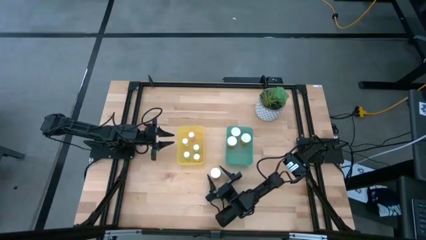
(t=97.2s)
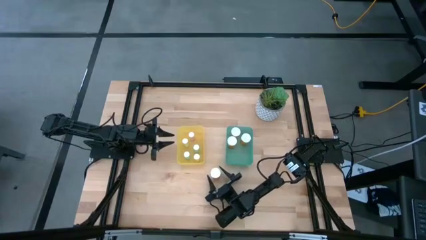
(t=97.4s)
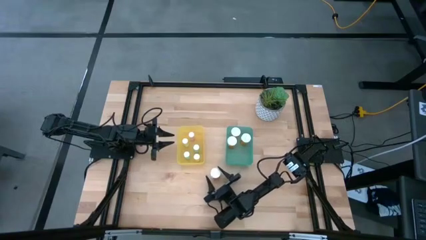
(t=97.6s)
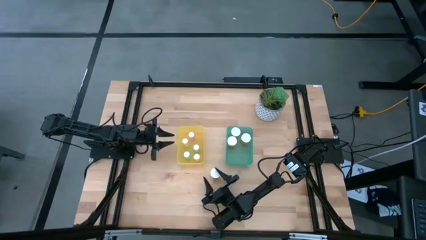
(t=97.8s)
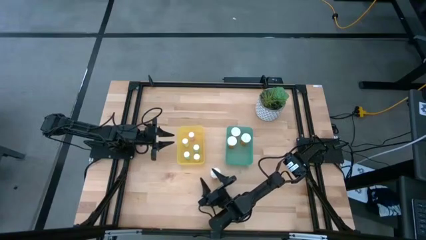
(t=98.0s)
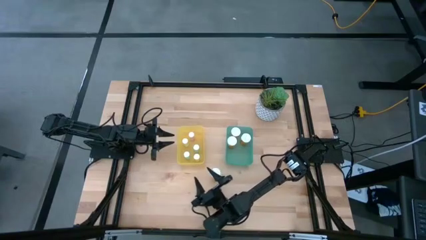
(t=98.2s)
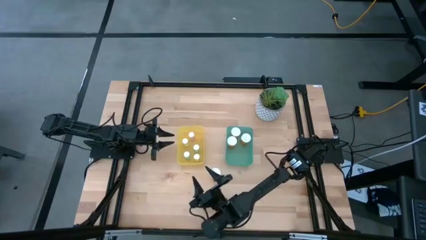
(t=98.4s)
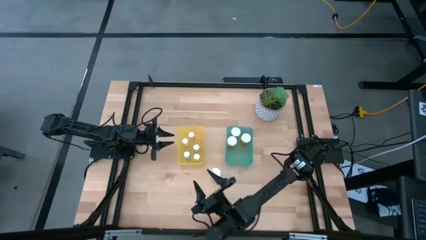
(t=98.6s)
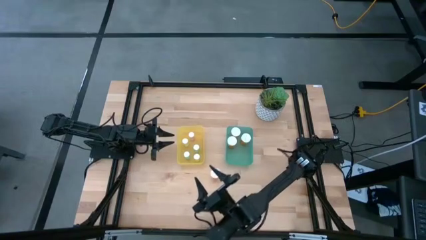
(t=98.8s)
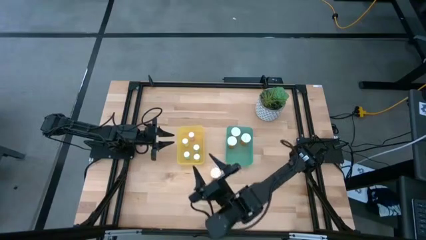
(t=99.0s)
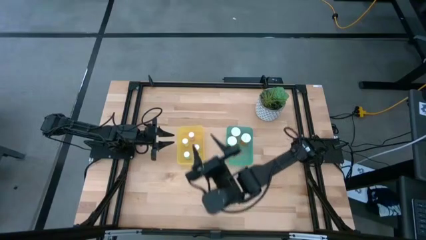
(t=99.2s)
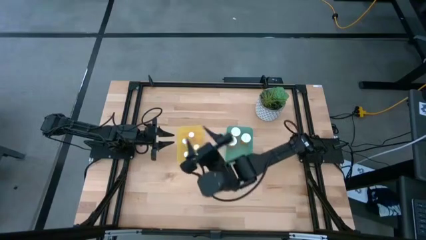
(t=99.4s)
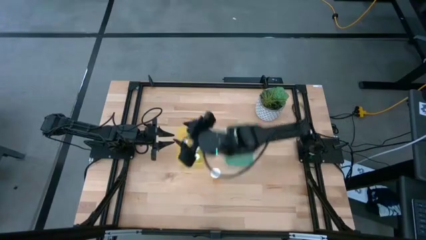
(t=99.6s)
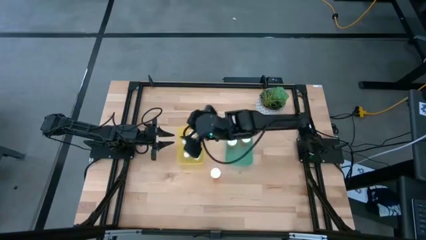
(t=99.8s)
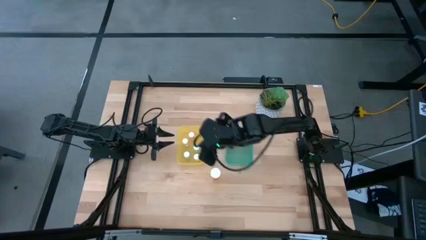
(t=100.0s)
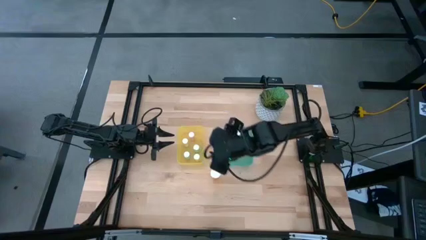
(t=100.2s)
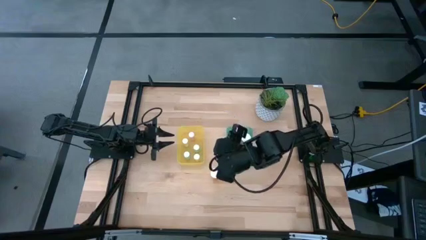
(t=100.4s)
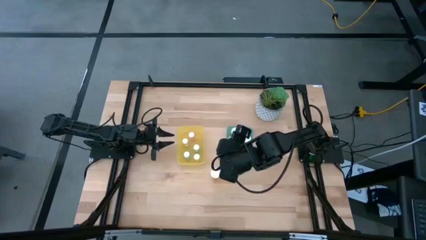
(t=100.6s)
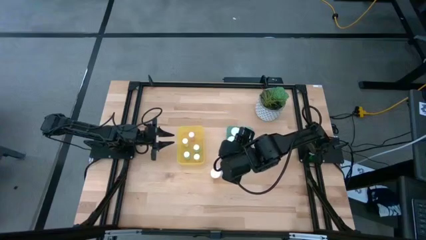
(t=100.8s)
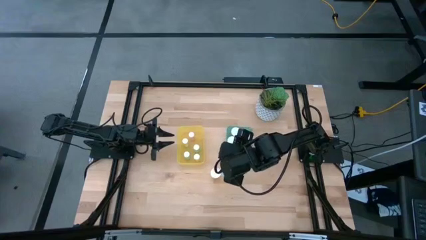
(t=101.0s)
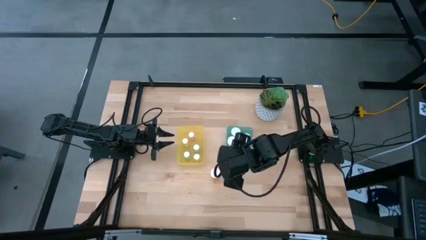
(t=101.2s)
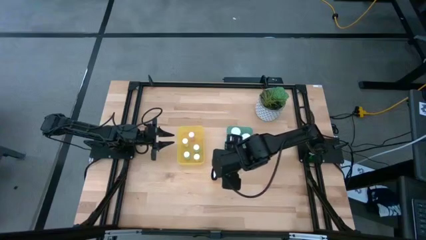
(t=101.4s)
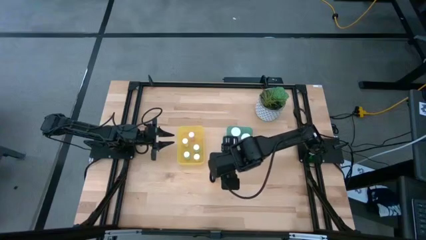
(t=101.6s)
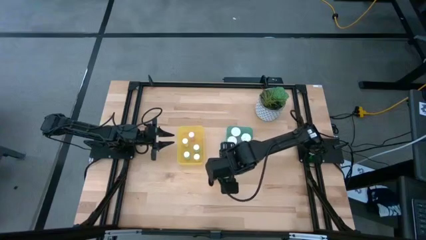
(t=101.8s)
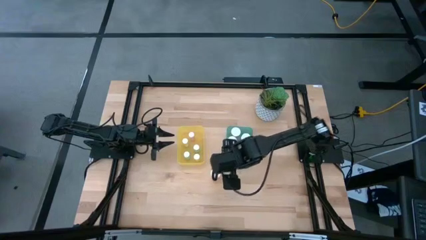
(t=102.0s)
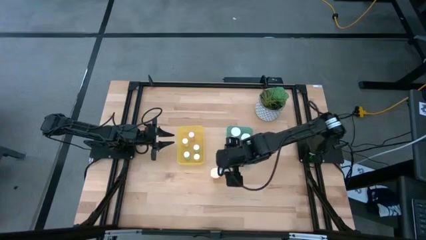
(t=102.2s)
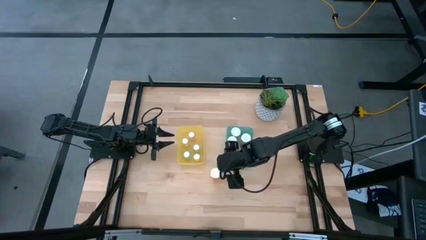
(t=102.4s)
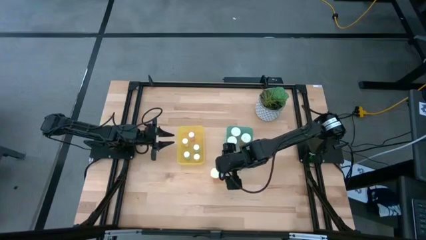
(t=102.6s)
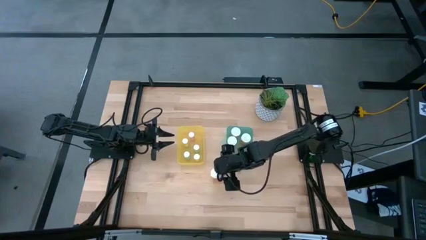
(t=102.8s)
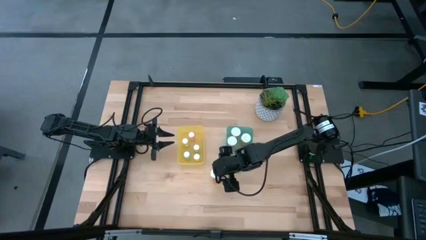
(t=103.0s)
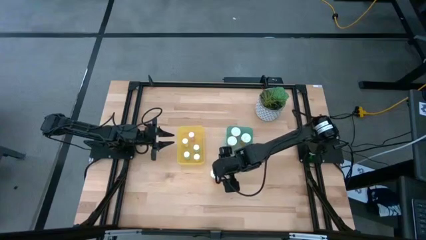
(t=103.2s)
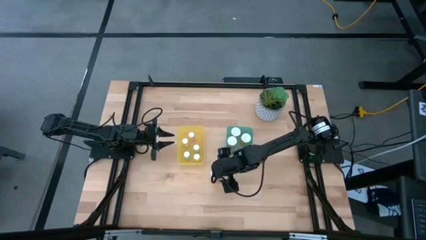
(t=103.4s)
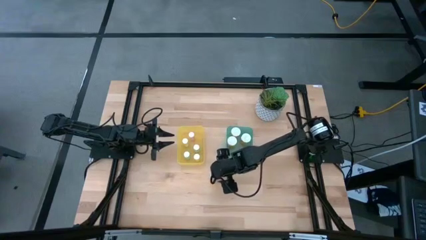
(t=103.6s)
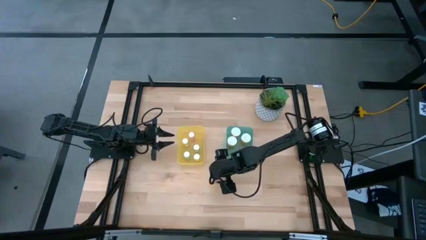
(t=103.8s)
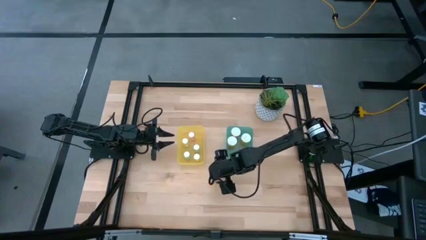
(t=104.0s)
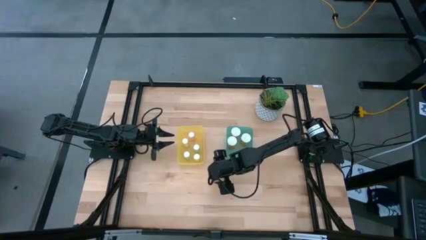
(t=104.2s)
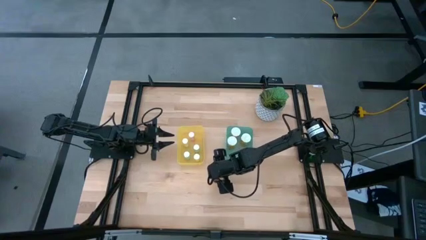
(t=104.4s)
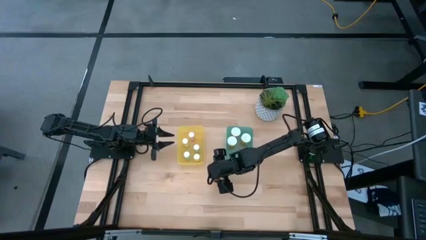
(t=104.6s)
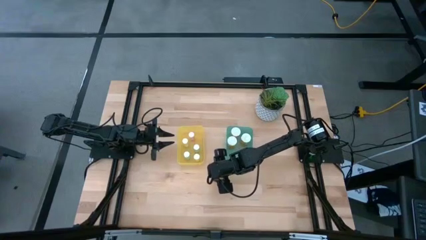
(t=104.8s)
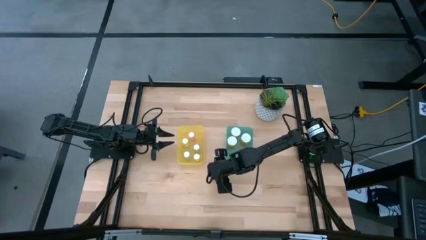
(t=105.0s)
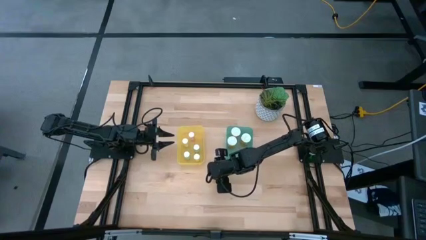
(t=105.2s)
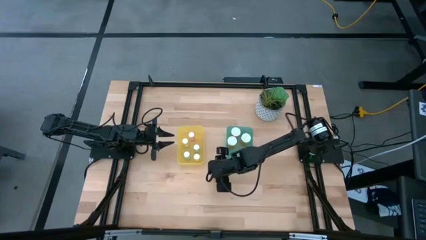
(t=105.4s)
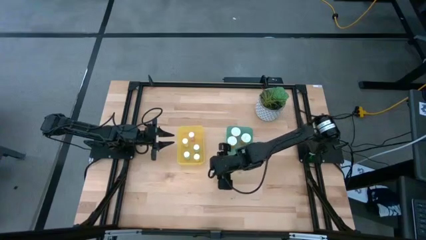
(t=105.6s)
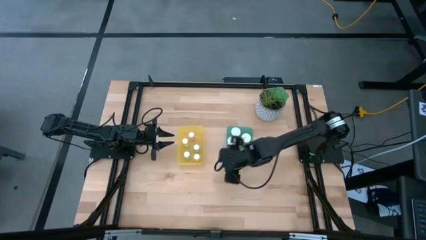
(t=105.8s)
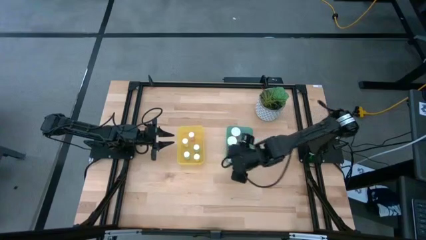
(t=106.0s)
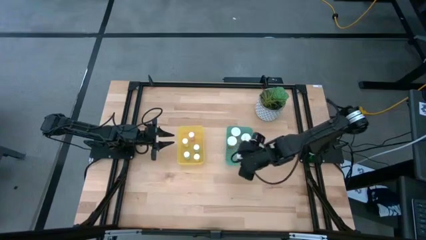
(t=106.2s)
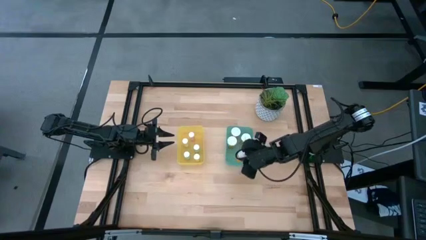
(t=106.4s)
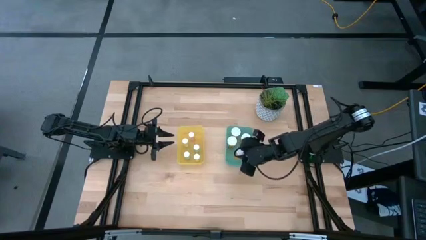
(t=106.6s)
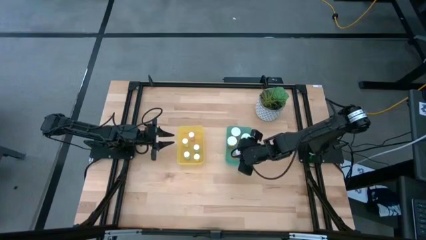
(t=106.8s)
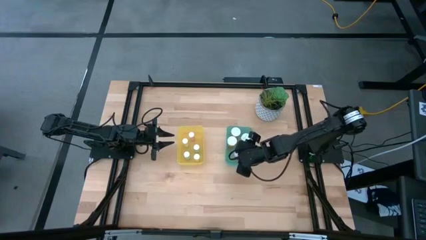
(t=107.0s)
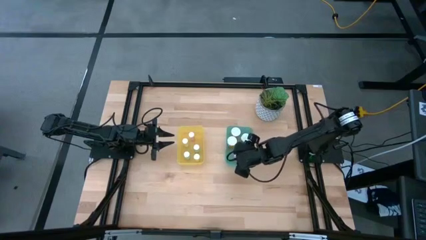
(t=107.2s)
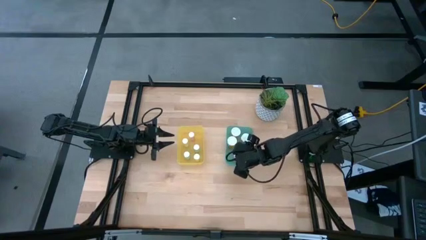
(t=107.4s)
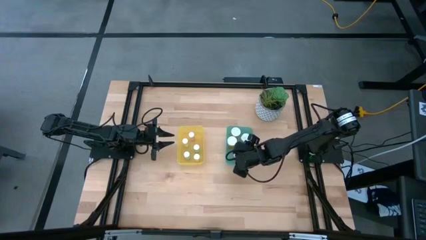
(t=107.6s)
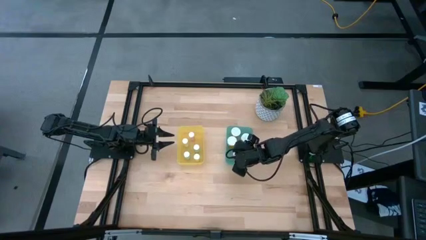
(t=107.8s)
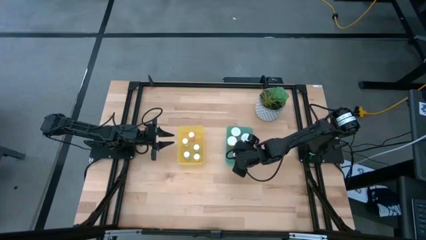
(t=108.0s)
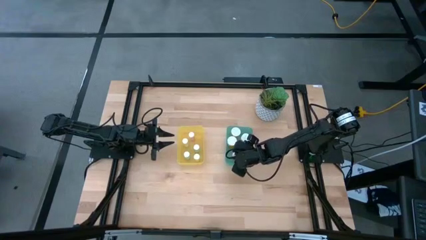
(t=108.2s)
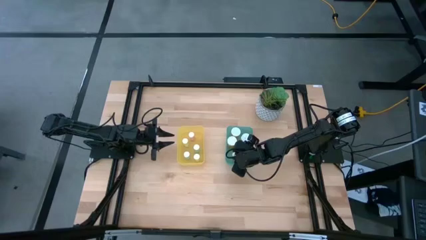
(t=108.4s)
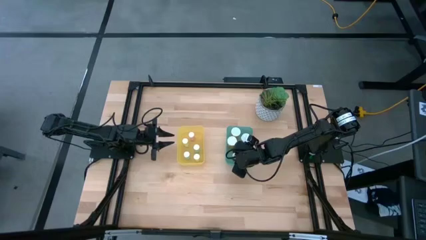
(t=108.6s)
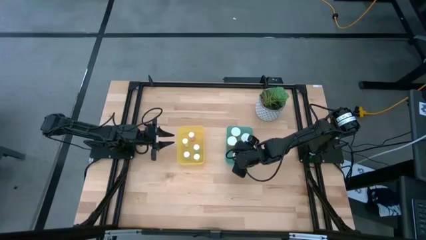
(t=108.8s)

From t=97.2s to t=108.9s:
Task: Pick and place medicine bottles into bin by pill shape (circle, oval)
Put the large orange pill bottle into the green bin
